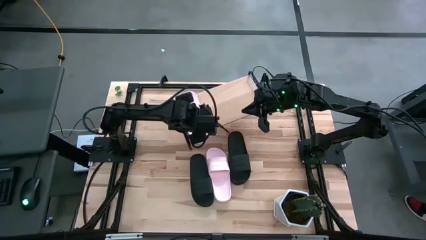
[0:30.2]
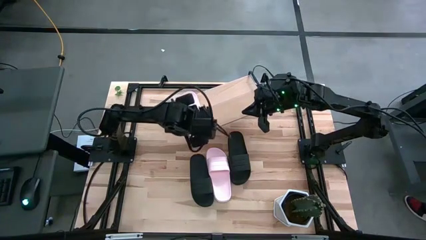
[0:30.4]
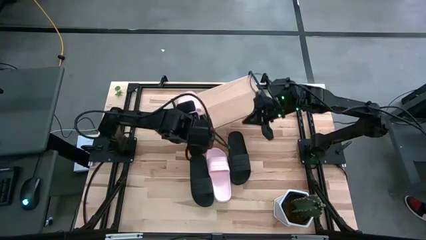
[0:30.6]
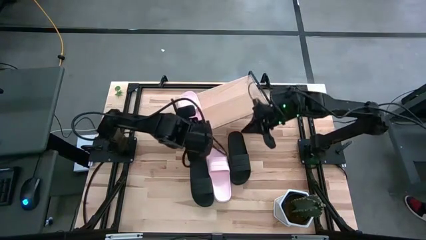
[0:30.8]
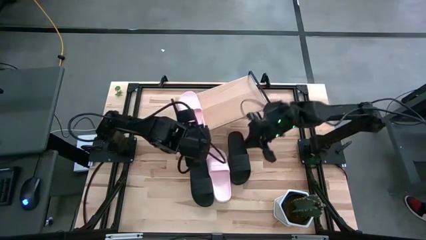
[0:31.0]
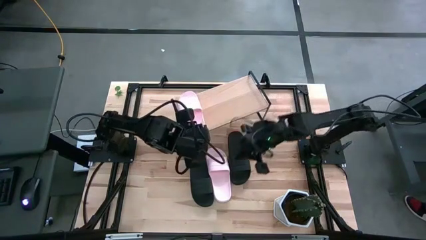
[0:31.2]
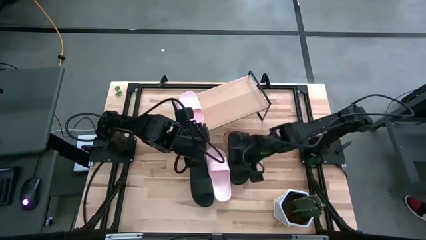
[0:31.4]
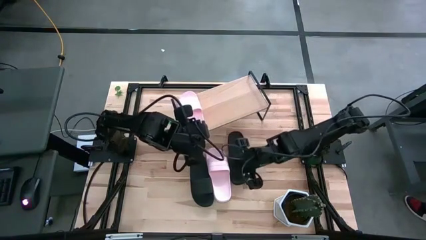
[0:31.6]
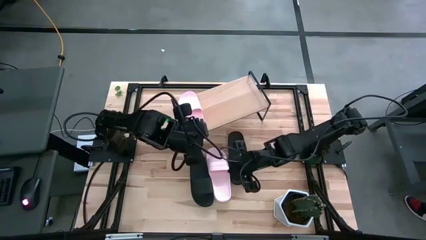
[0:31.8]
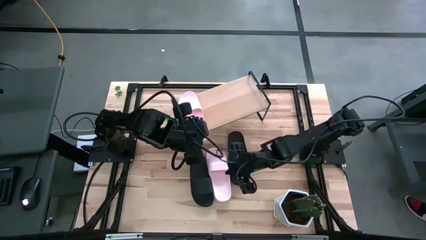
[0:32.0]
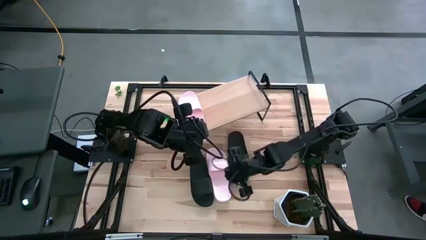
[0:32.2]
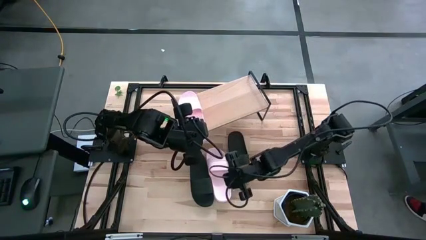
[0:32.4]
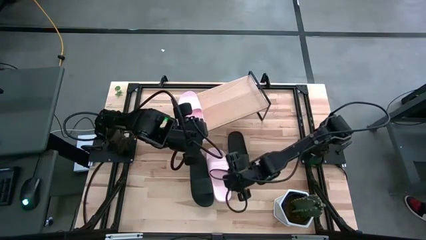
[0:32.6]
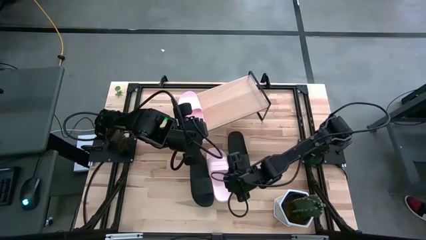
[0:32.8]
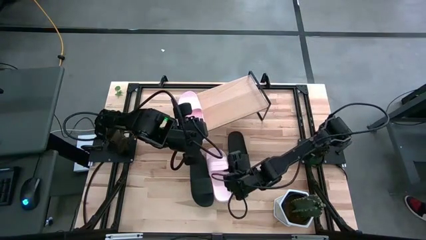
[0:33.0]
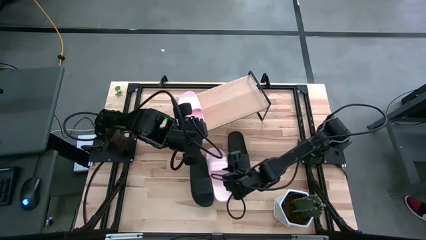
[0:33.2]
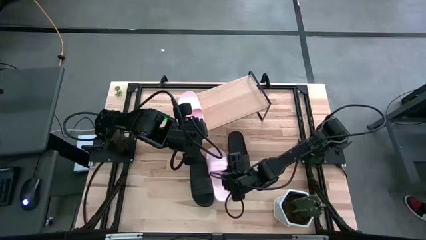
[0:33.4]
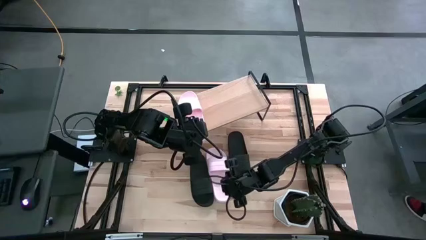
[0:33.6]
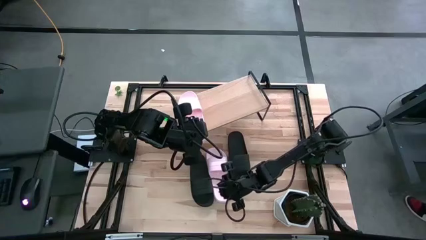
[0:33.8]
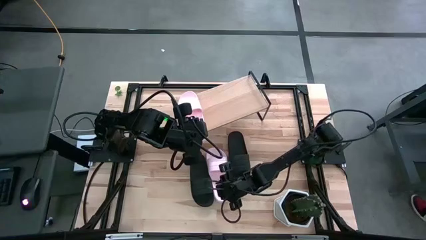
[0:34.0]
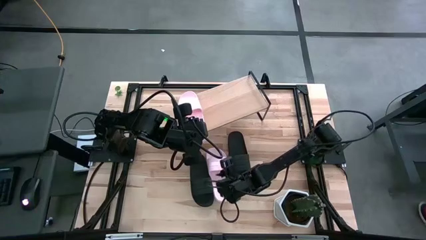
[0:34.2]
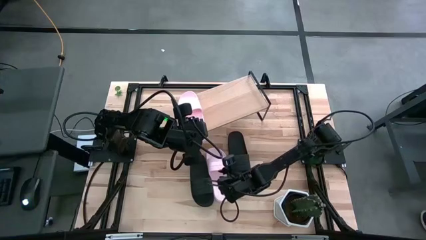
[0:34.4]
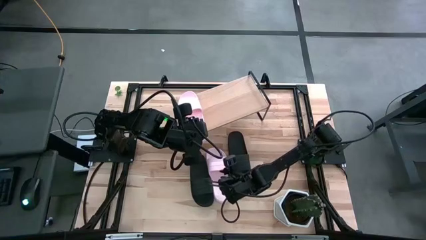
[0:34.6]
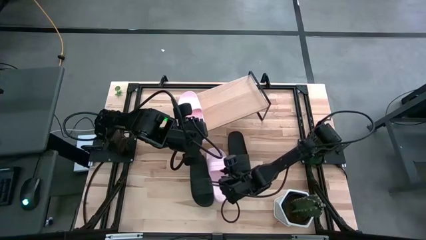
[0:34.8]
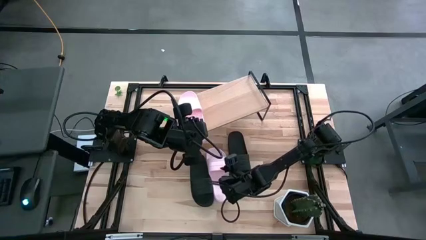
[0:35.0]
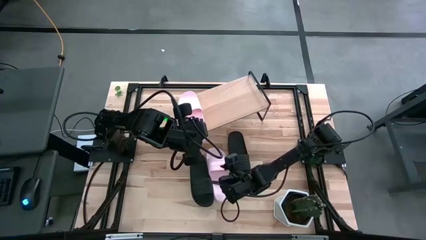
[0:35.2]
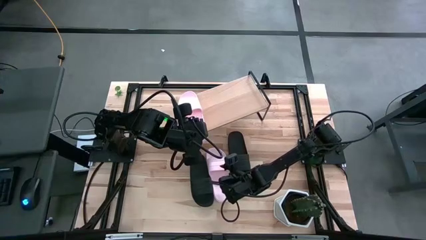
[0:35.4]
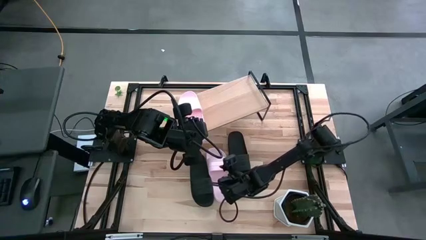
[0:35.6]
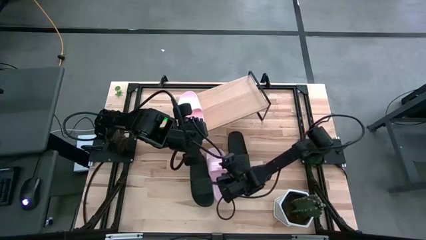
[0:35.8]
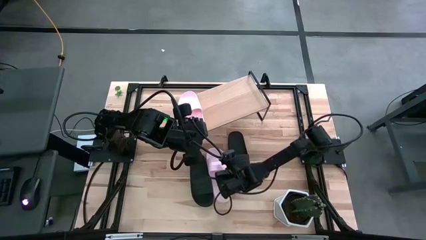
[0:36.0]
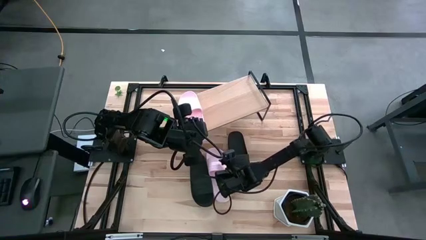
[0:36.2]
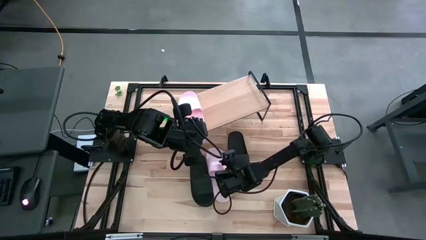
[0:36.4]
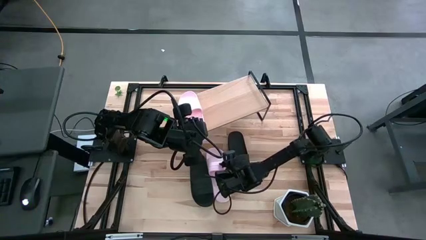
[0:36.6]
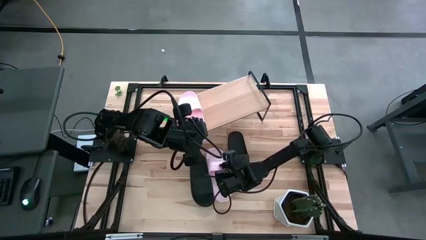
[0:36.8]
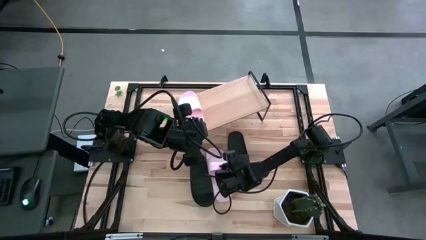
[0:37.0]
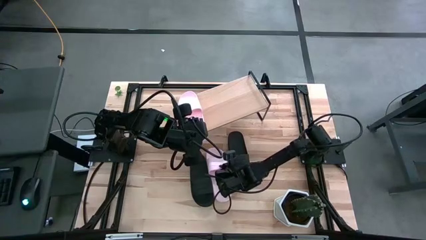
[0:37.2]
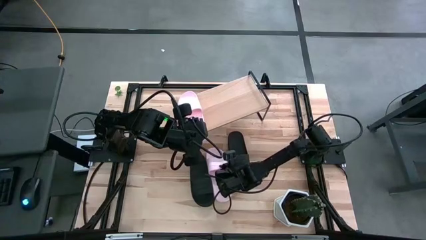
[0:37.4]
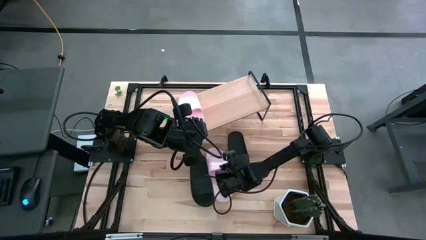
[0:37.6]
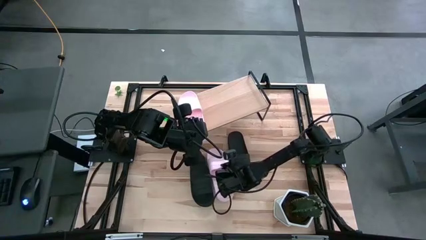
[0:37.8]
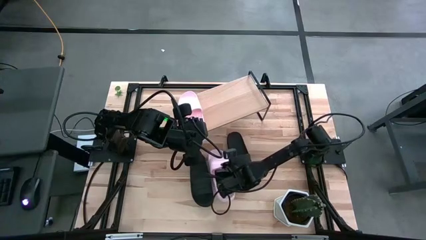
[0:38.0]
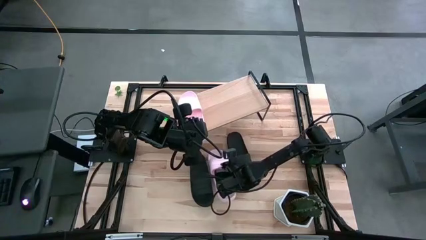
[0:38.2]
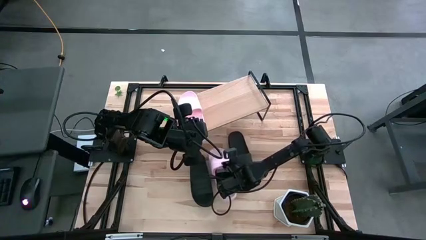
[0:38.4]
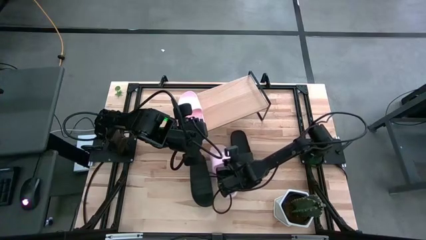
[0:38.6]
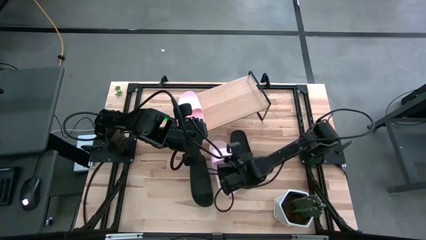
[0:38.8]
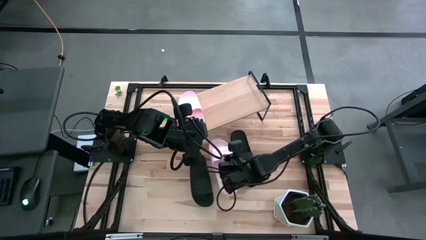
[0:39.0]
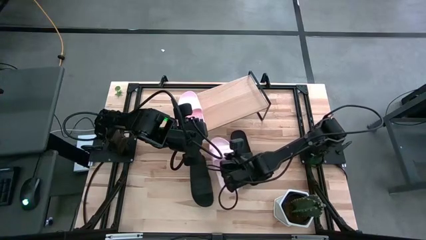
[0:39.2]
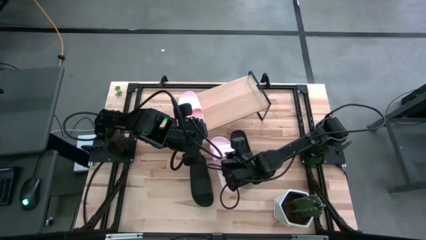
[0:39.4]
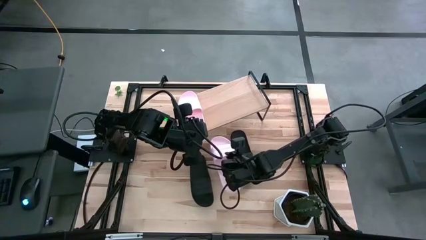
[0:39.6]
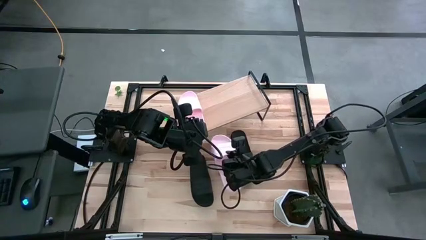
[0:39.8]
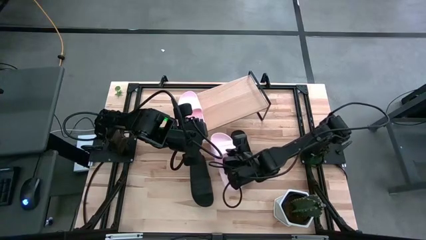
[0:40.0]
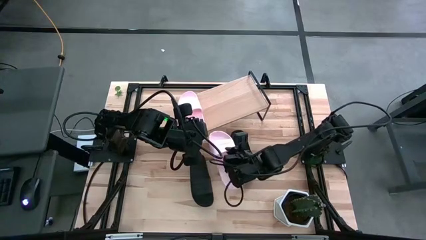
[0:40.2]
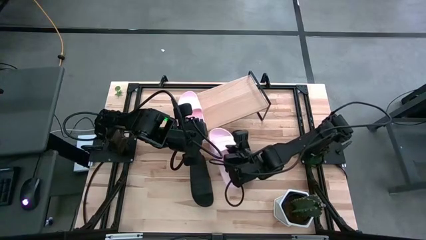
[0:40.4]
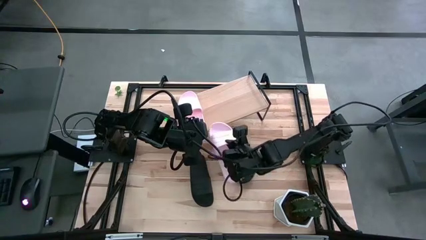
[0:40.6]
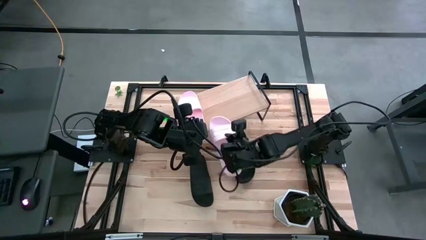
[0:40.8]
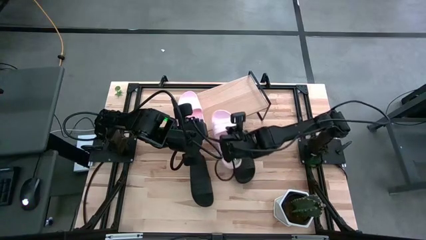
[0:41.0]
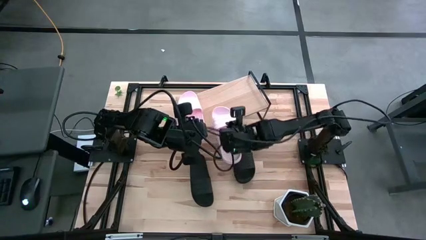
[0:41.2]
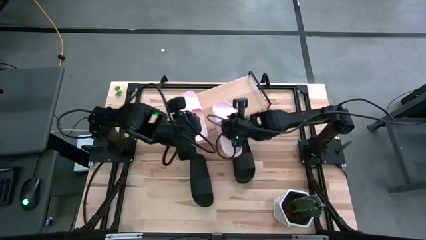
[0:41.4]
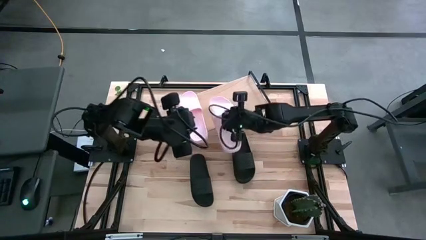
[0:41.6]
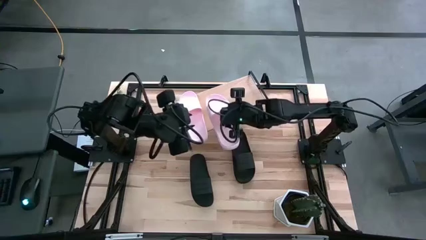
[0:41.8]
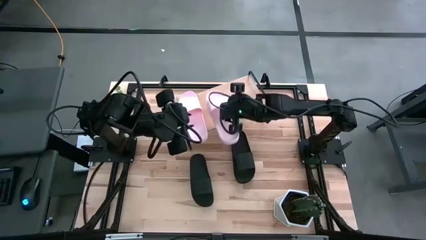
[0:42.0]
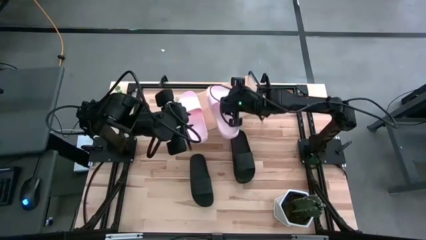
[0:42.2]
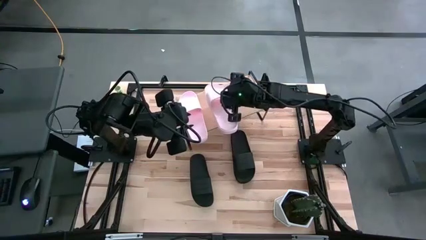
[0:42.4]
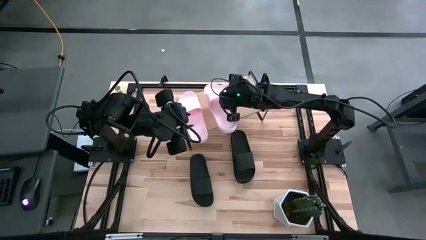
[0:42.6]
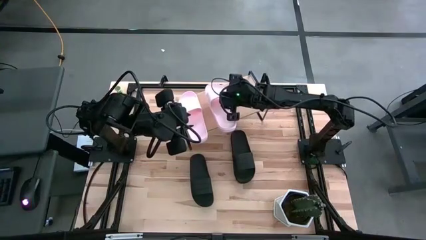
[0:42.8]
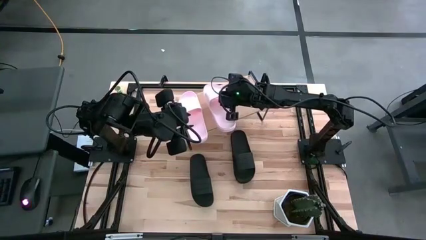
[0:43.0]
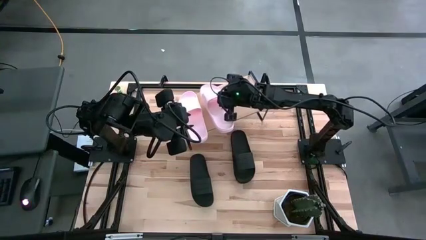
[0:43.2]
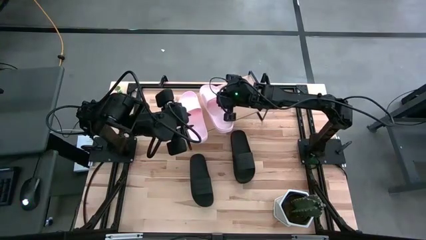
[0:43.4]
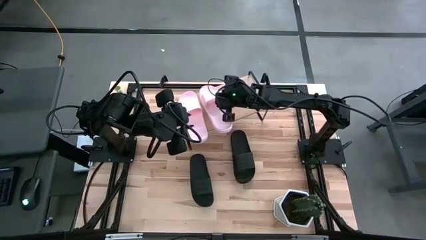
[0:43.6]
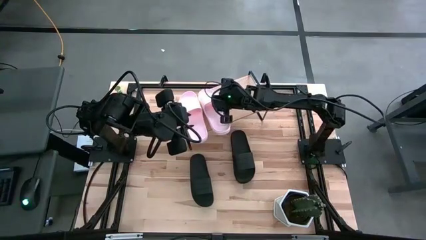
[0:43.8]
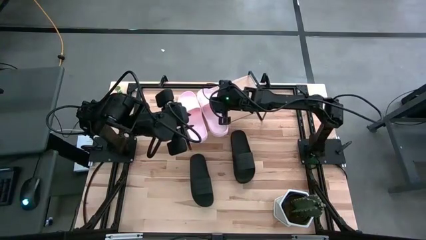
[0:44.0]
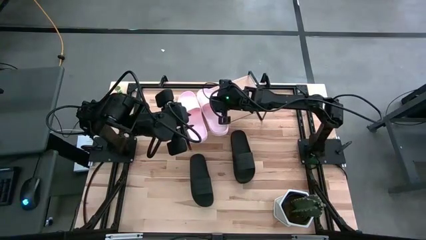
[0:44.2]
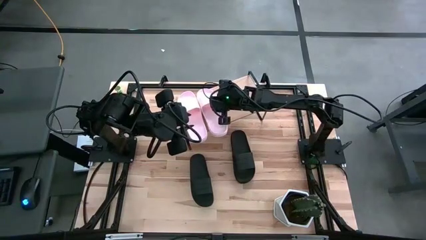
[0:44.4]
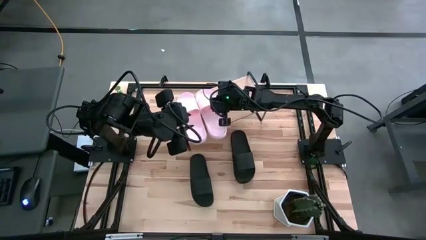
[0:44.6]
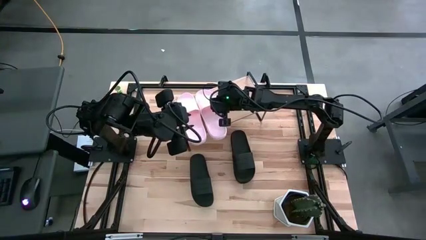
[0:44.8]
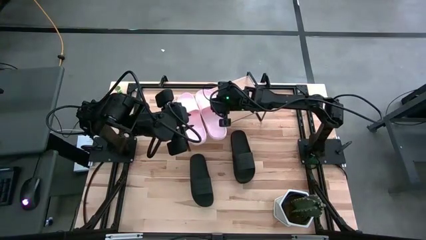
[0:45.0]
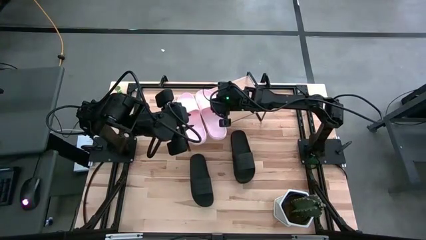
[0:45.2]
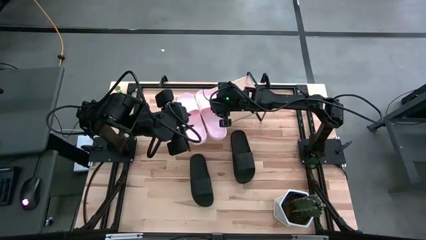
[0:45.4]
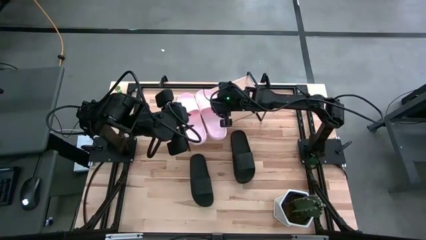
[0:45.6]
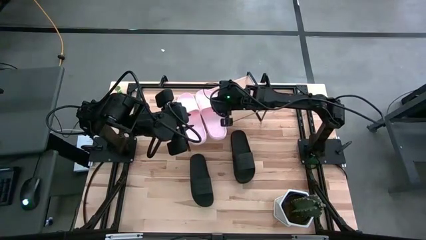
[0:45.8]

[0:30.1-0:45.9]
Task: Pick and place slides into the shelf
Put the pink slide on the shelf
